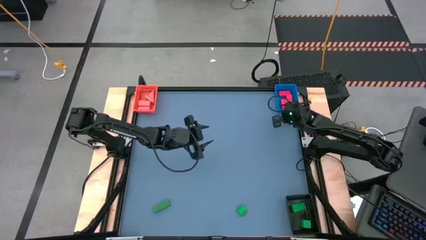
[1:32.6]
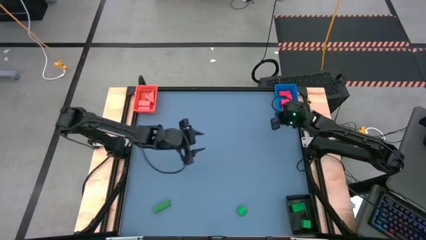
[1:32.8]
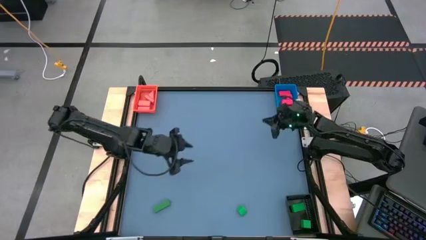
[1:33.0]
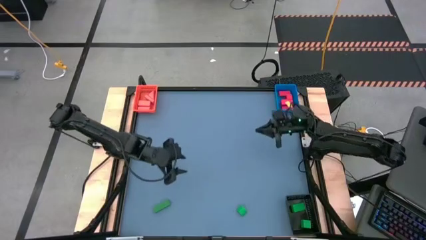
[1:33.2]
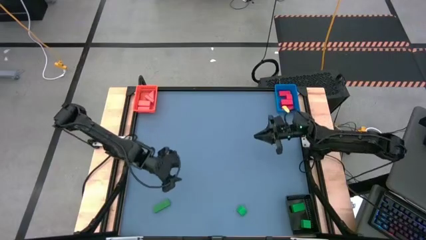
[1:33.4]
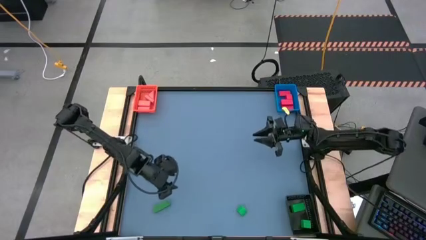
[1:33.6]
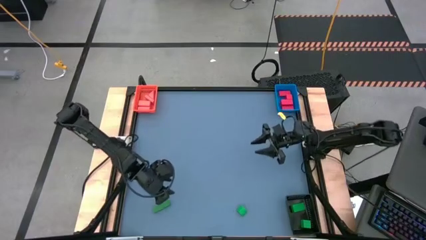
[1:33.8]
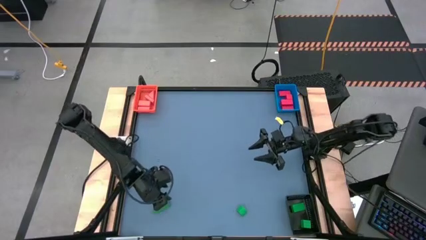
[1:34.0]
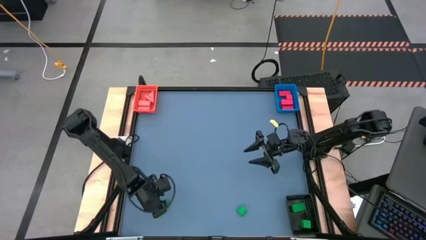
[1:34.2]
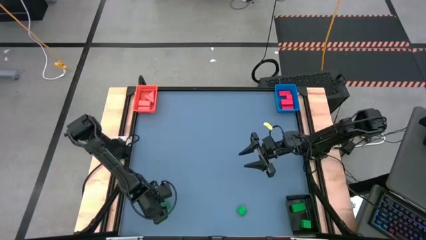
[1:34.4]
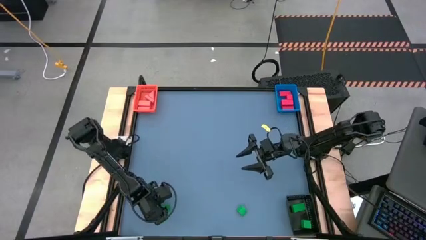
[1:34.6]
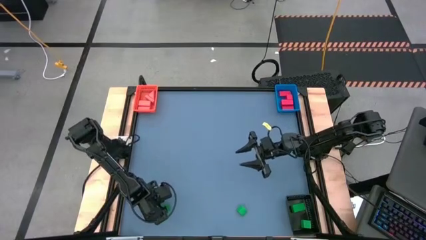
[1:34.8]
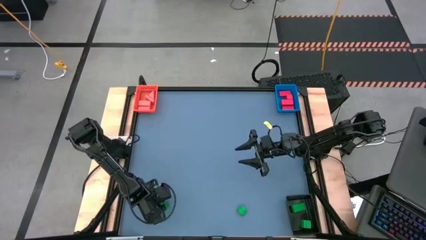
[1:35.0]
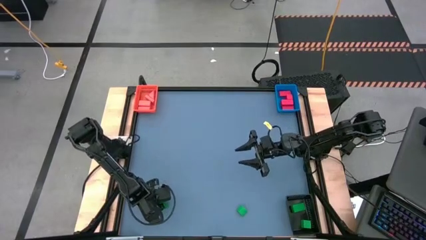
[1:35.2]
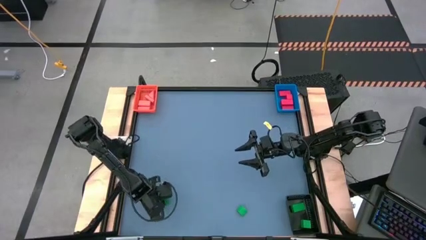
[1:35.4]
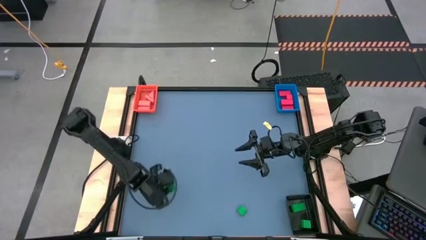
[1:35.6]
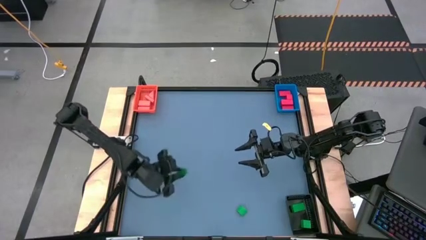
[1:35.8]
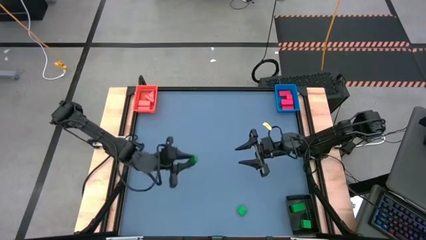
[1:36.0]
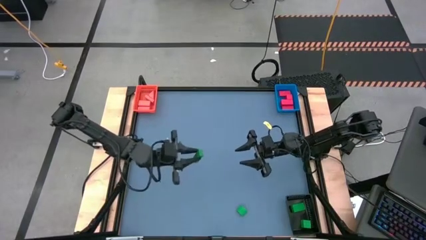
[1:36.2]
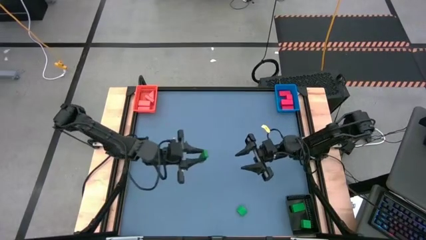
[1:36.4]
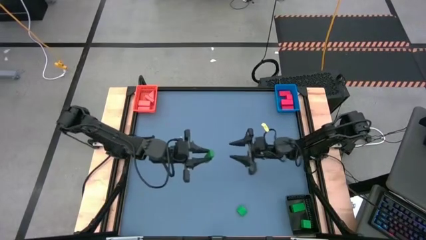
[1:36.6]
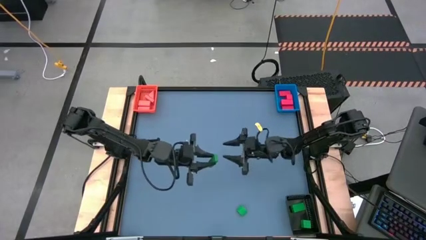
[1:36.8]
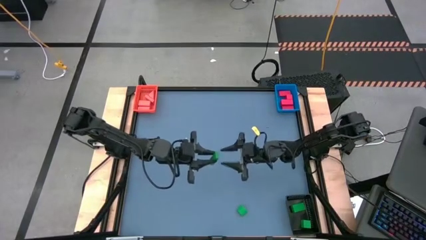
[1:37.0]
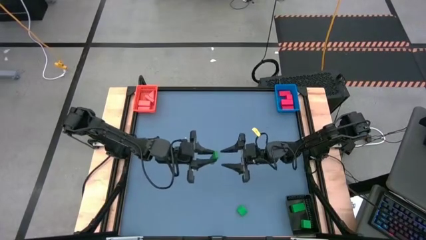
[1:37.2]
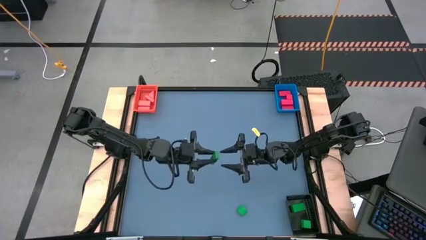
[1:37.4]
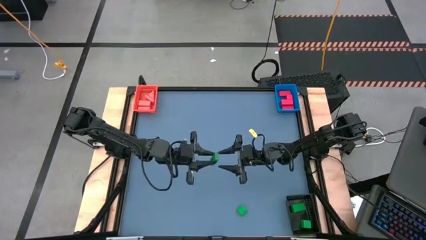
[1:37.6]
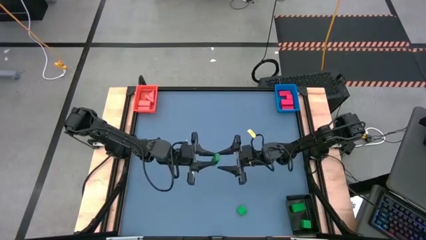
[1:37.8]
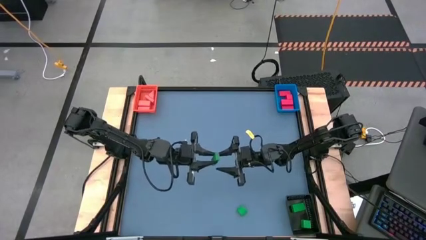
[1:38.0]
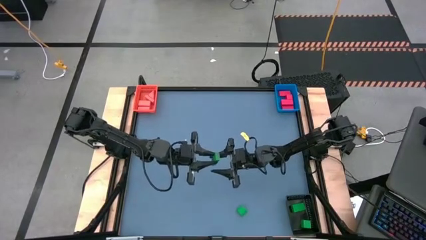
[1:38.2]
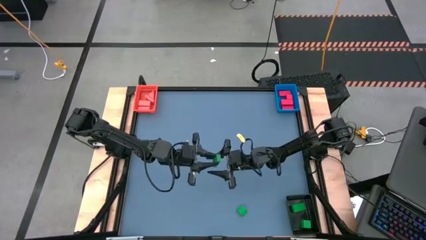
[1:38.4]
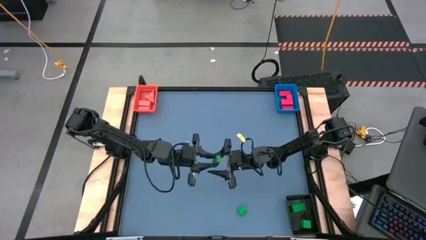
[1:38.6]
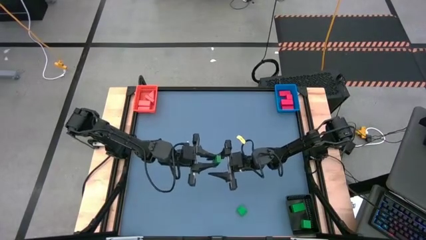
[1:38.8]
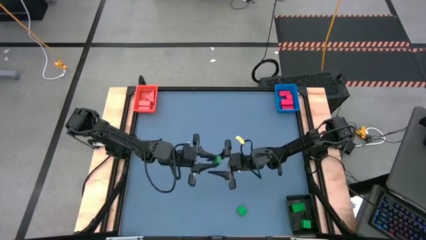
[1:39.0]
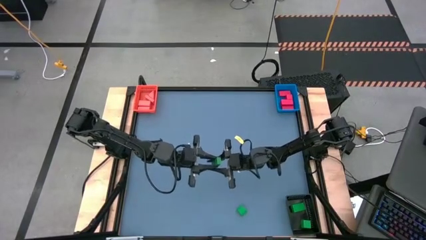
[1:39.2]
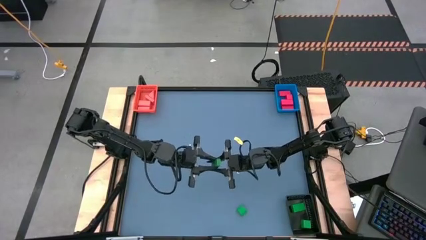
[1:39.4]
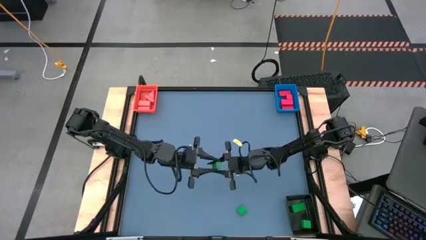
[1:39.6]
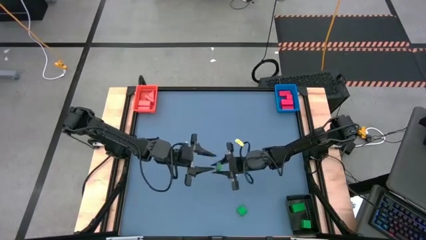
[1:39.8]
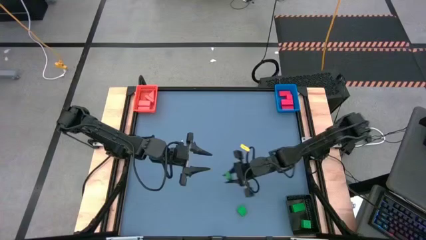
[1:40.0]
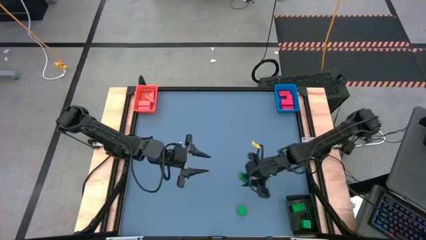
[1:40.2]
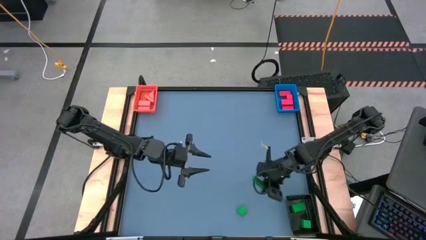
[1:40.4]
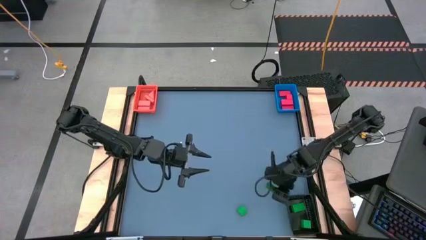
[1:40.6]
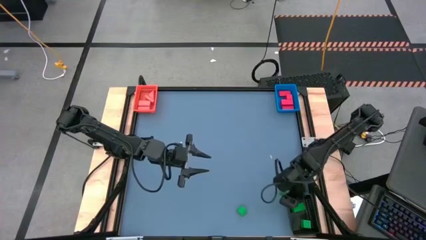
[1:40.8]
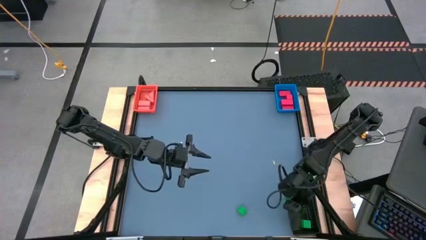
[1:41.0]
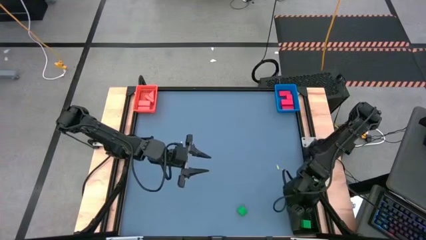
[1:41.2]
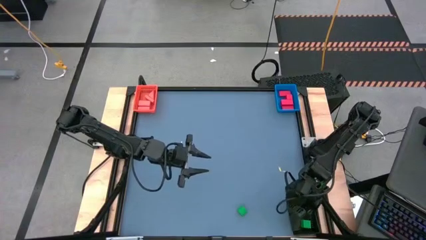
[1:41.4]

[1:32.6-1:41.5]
Task: Sort & place blocks by color
Put the green block into the black bin

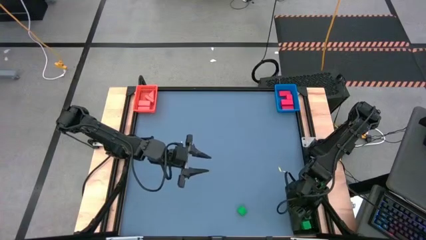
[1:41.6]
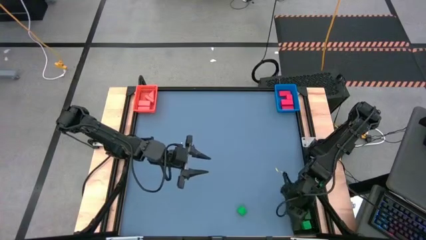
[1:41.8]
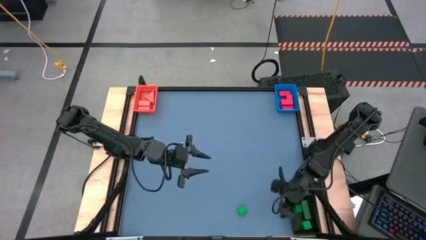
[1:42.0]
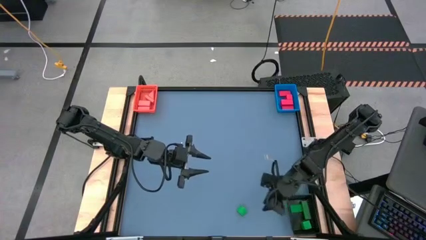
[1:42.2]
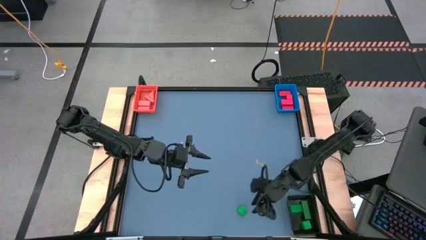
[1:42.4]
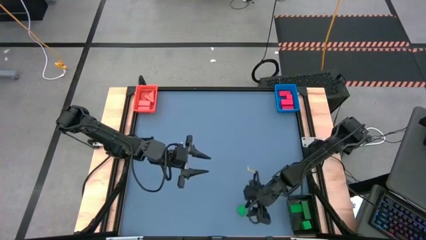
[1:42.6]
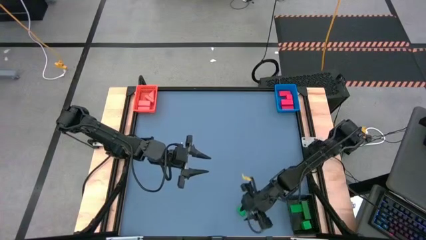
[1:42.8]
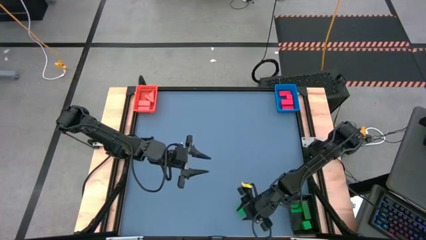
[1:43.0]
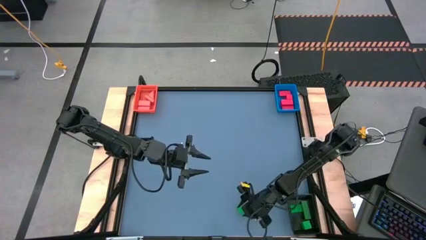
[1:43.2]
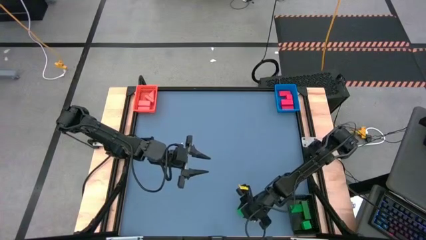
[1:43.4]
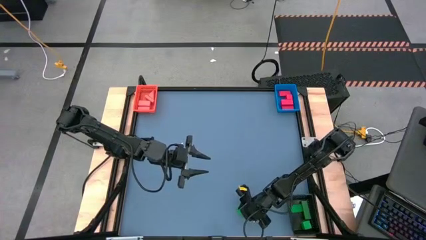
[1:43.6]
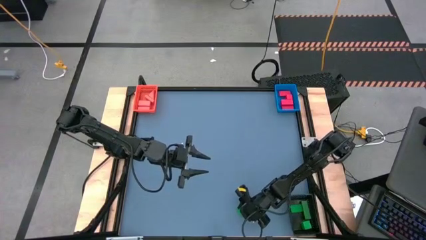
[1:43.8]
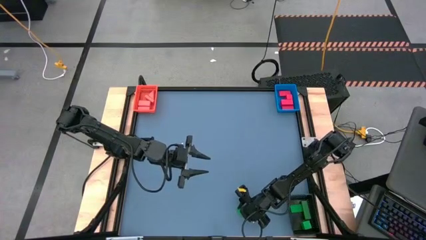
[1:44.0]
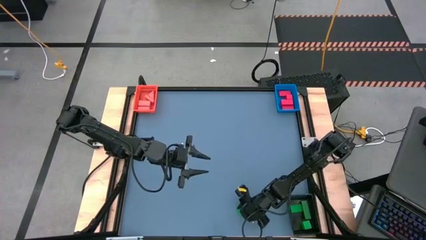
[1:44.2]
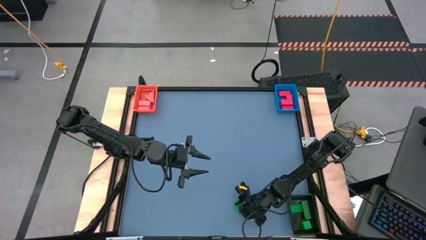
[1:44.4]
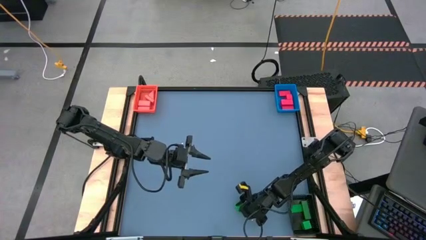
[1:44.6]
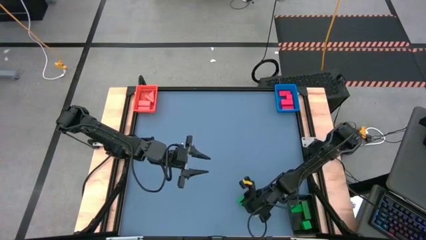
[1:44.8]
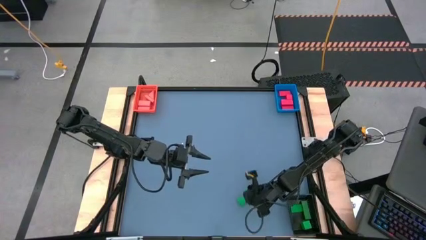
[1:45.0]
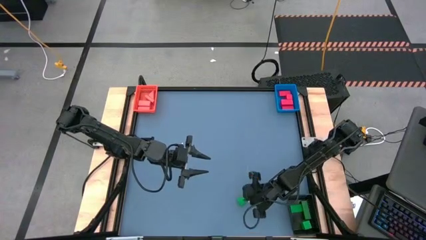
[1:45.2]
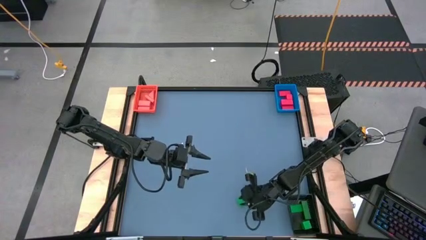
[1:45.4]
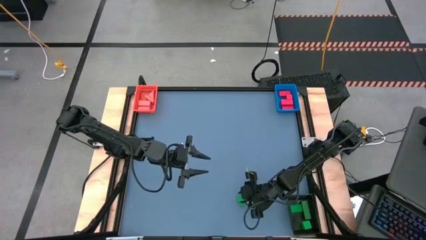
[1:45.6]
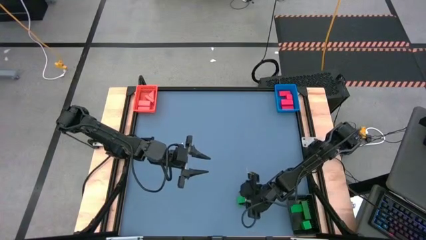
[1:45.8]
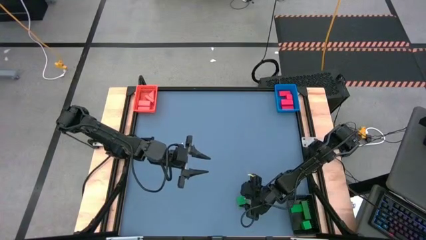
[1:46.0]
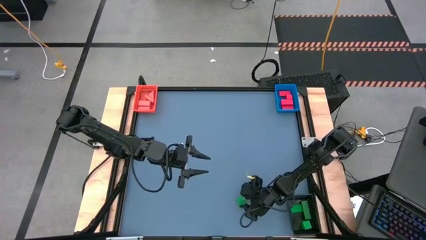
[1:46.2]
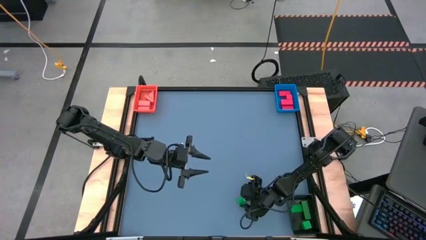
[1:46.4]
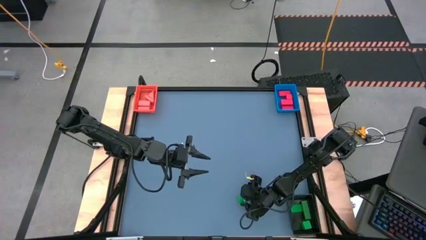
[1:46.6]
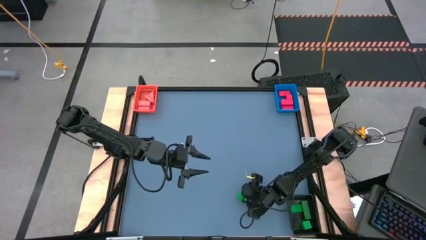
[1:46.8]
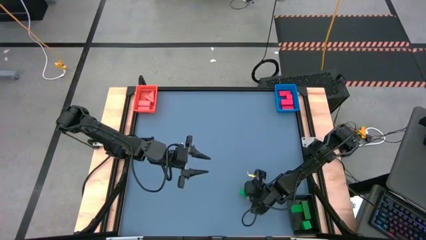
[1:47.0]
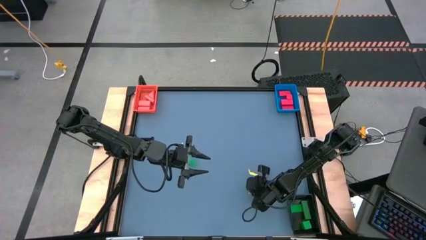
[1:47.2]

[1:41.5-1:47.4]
Put the green block into the black bin
